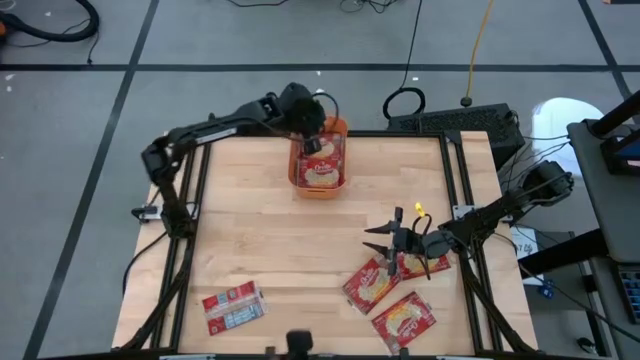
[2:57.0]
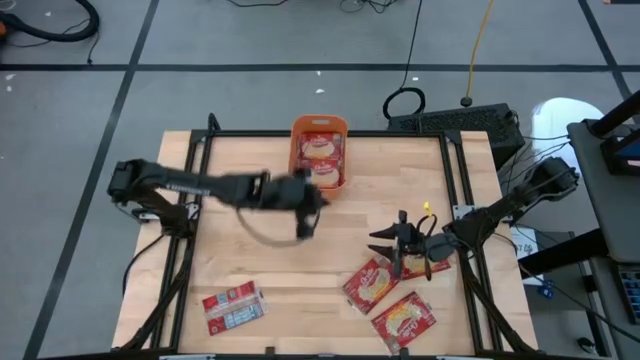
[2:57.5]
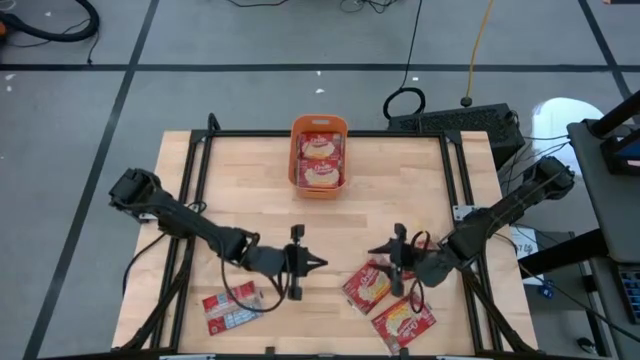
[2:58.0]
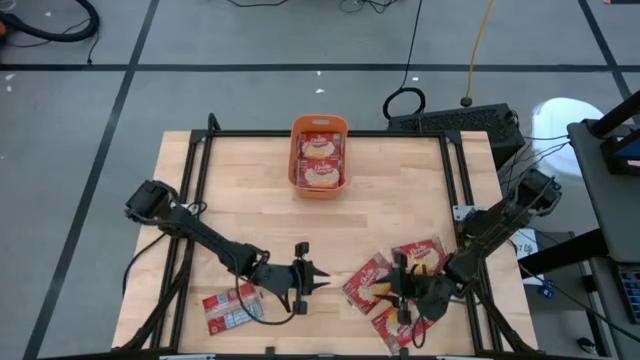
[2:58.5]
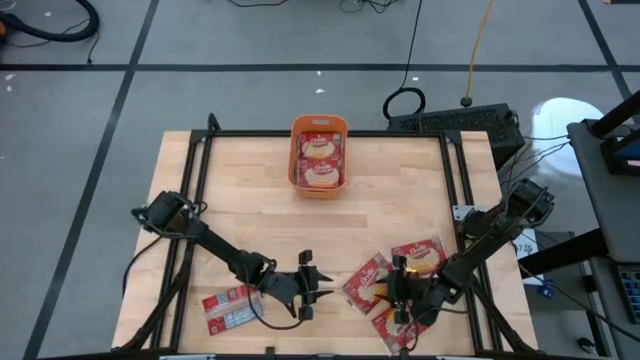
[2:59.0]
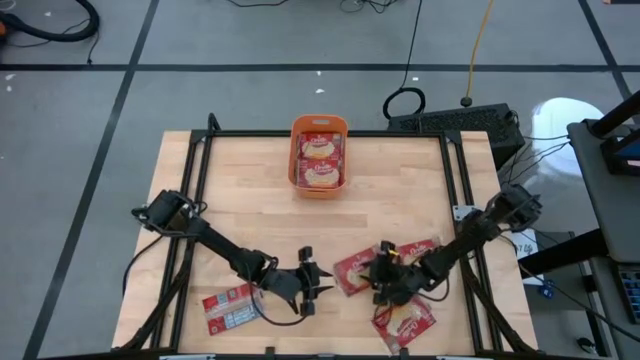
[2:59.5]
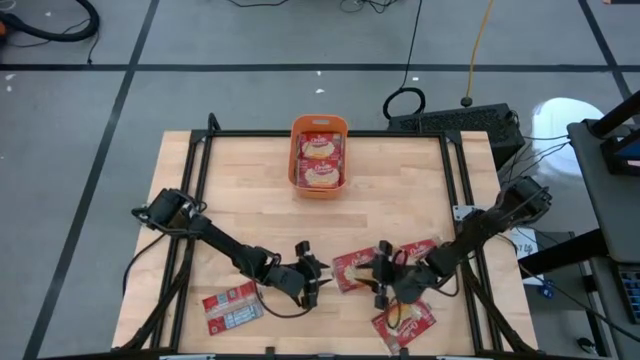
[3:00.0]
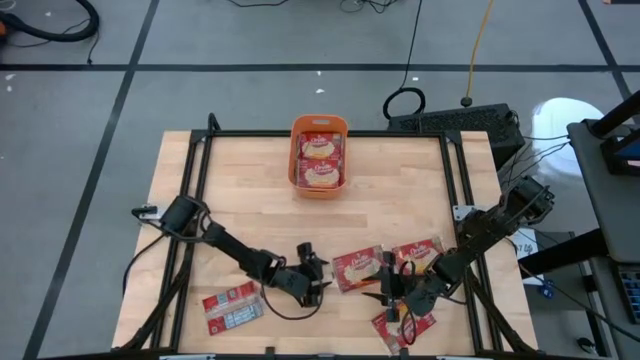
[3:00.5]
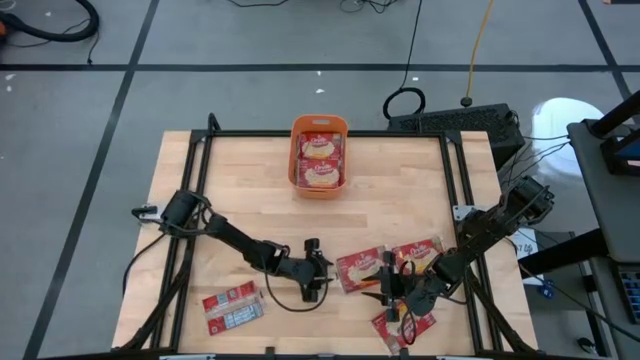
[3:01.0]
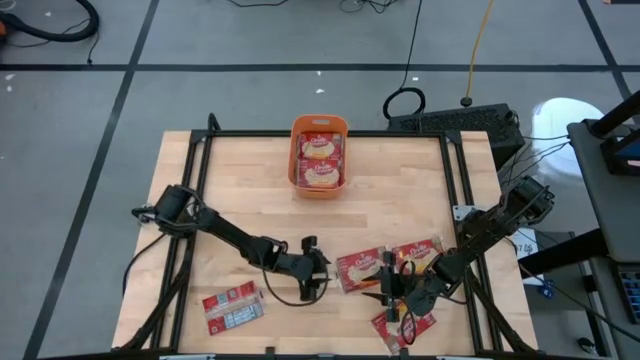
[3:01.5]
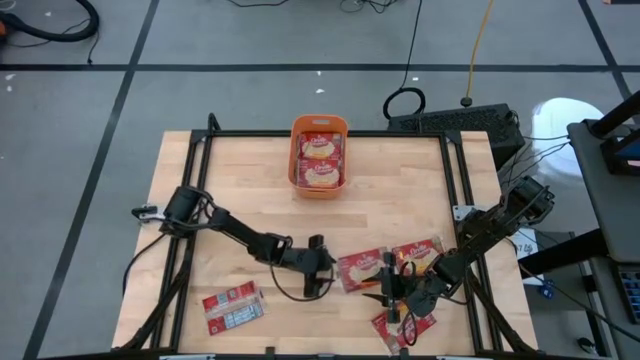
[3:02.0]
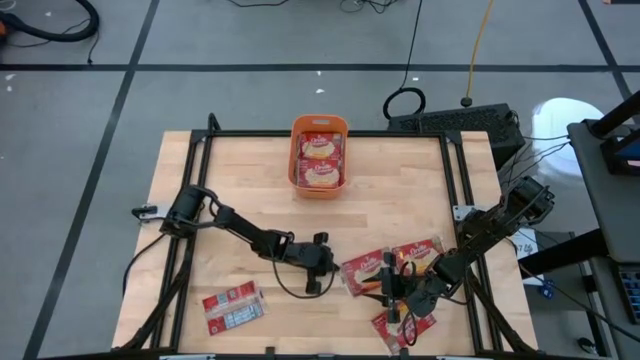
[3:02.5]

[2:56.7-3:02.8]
Task: Sort popcorn bags into baskets
Put the red popcorn bag into the orange bin

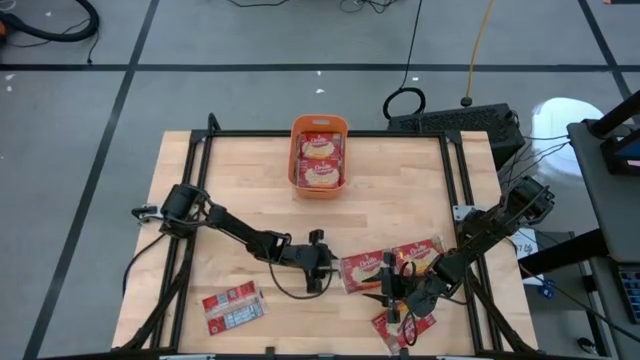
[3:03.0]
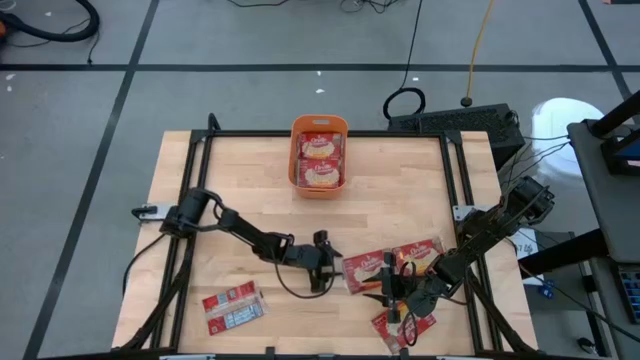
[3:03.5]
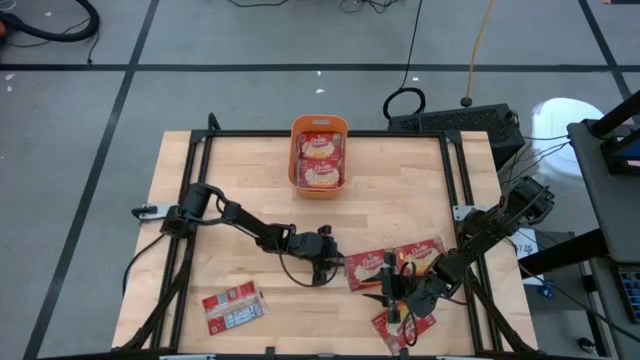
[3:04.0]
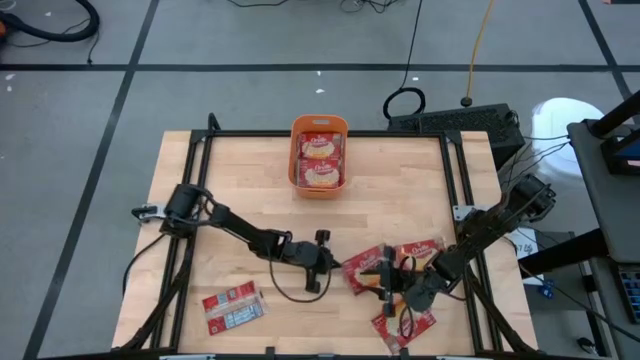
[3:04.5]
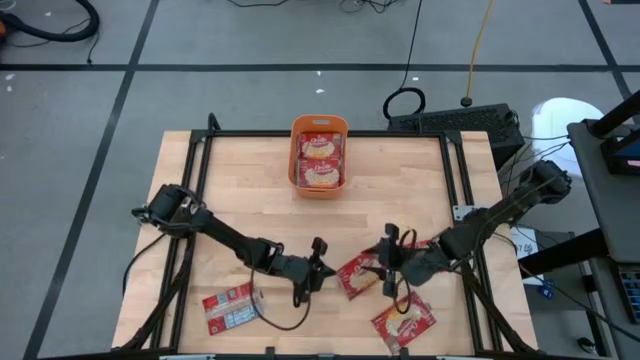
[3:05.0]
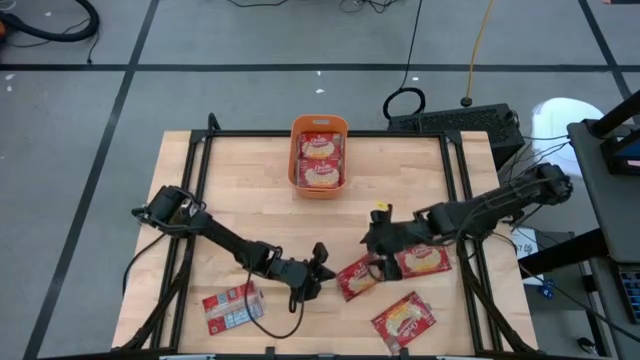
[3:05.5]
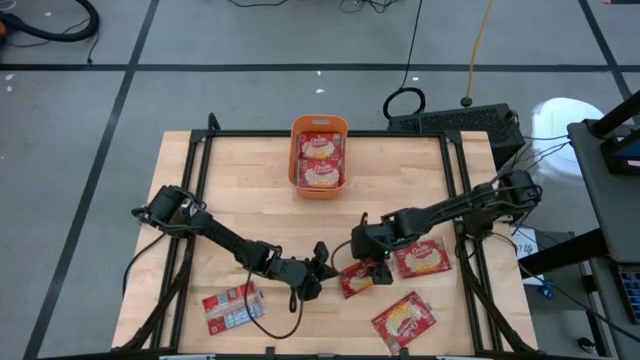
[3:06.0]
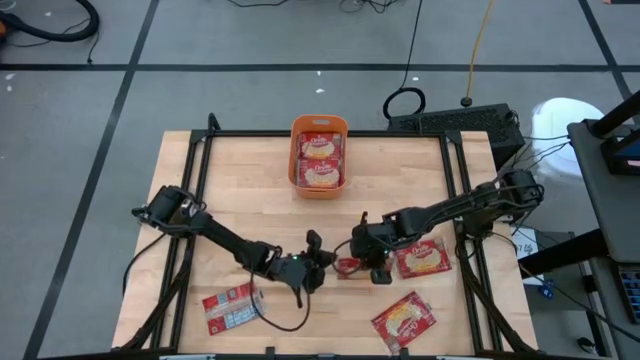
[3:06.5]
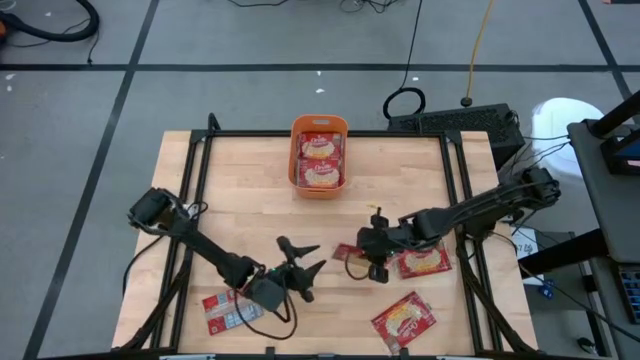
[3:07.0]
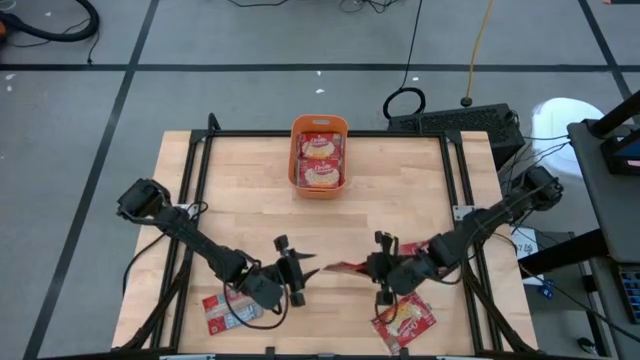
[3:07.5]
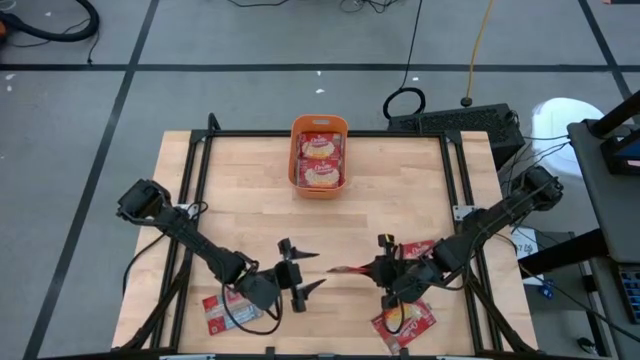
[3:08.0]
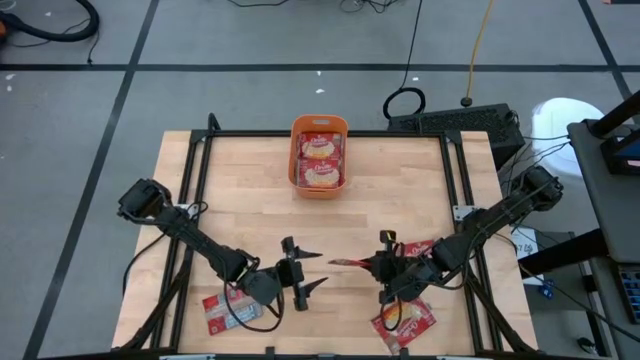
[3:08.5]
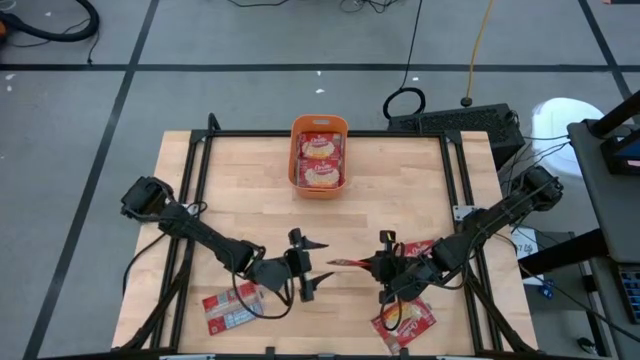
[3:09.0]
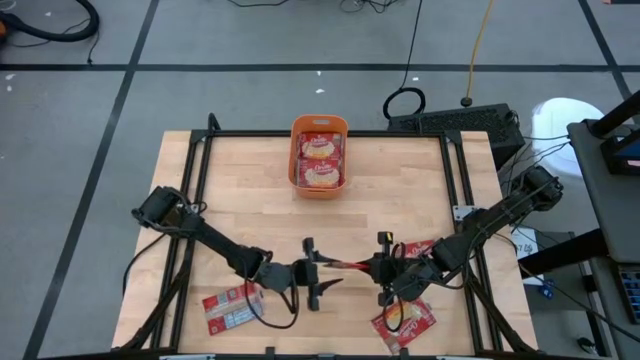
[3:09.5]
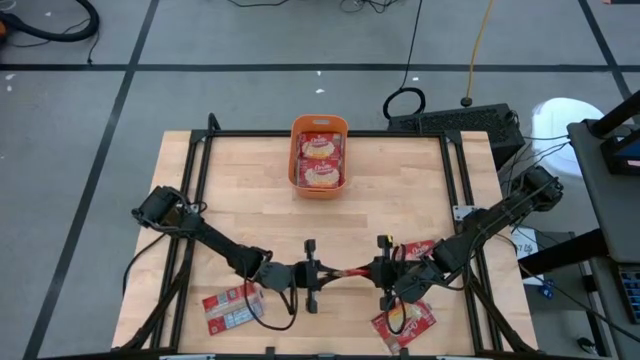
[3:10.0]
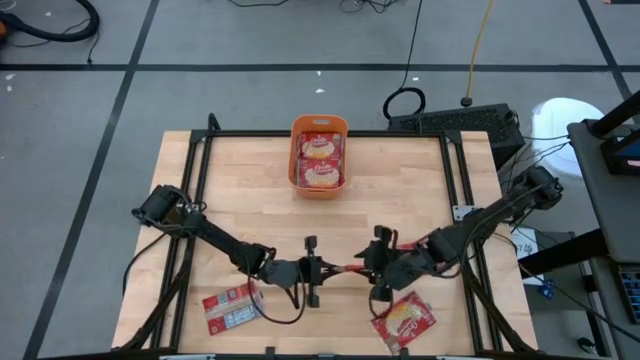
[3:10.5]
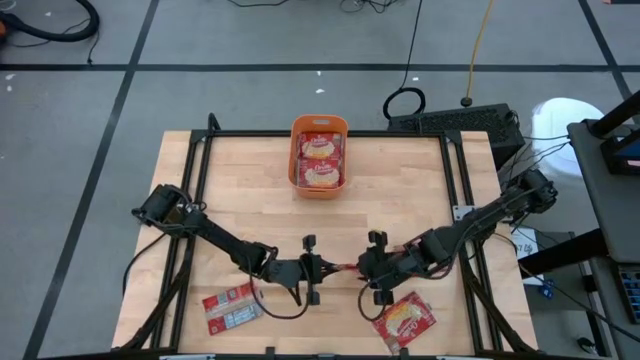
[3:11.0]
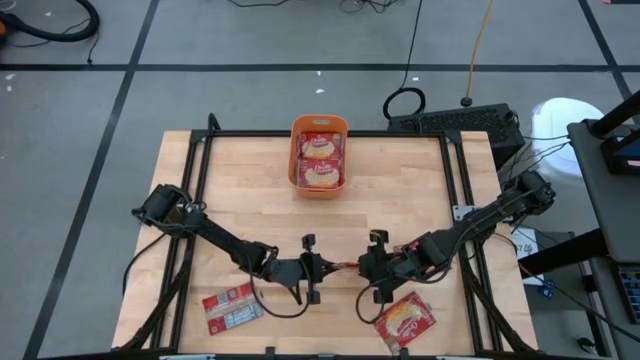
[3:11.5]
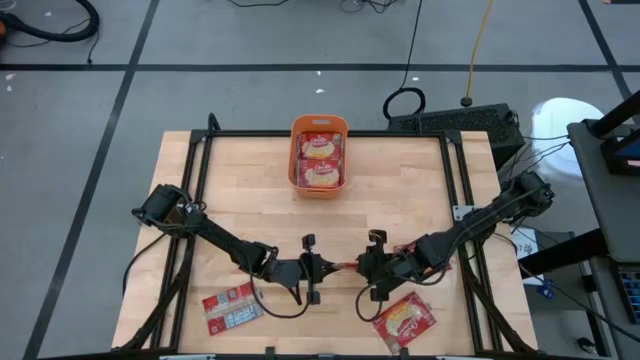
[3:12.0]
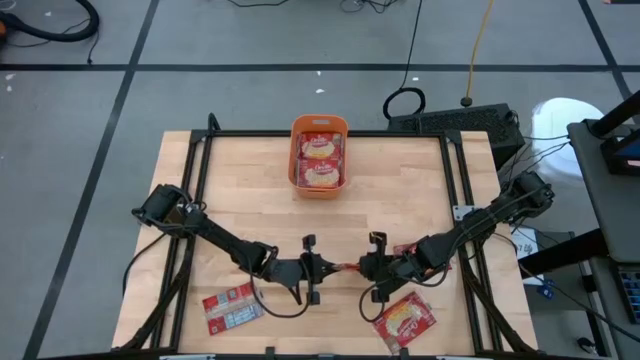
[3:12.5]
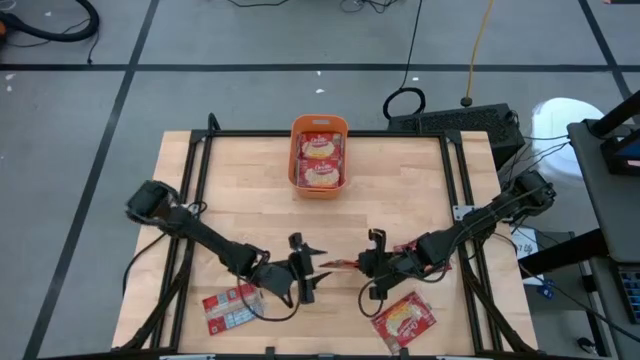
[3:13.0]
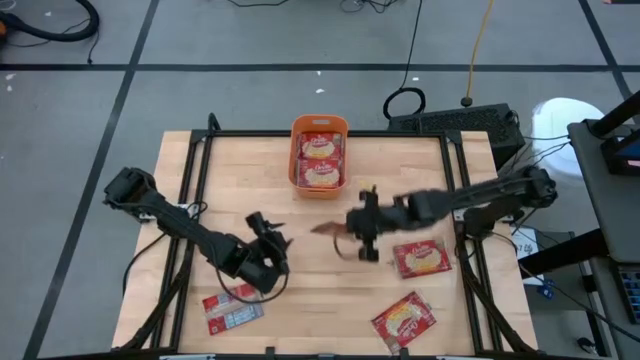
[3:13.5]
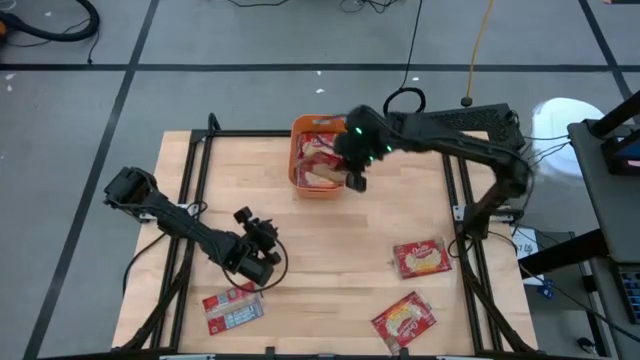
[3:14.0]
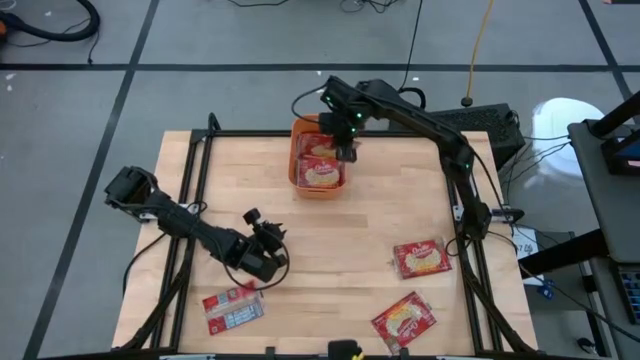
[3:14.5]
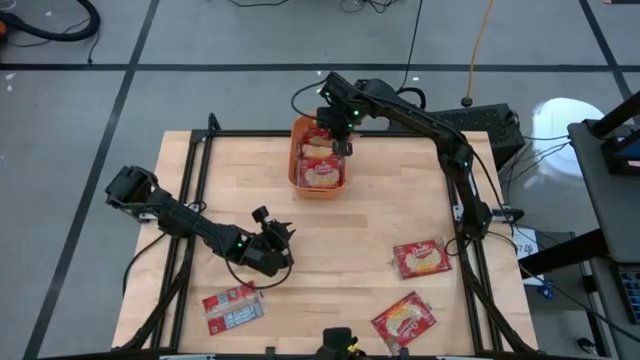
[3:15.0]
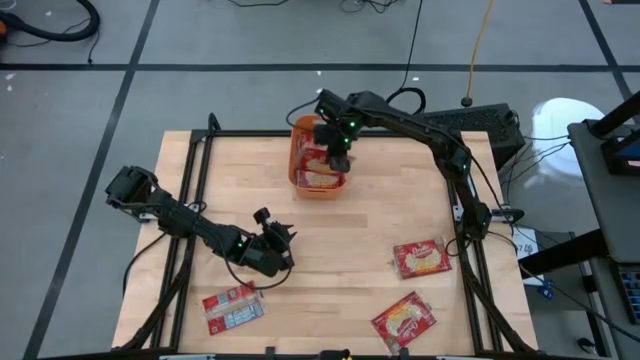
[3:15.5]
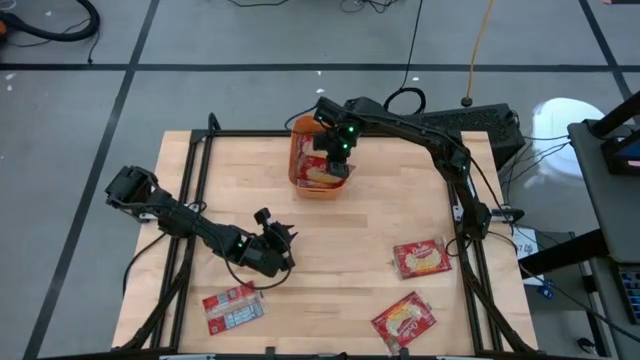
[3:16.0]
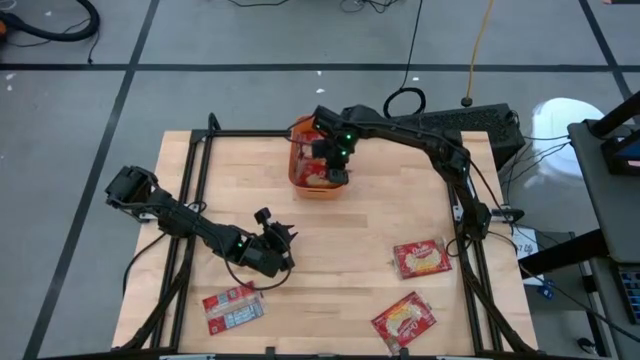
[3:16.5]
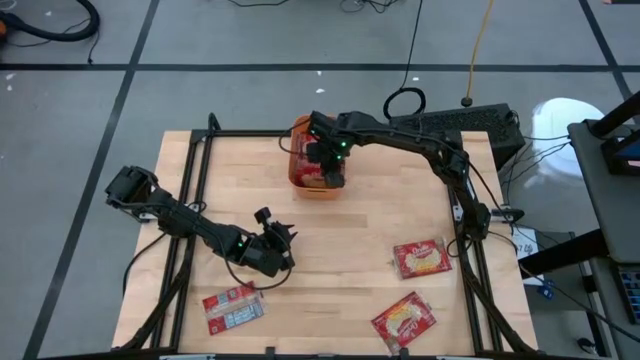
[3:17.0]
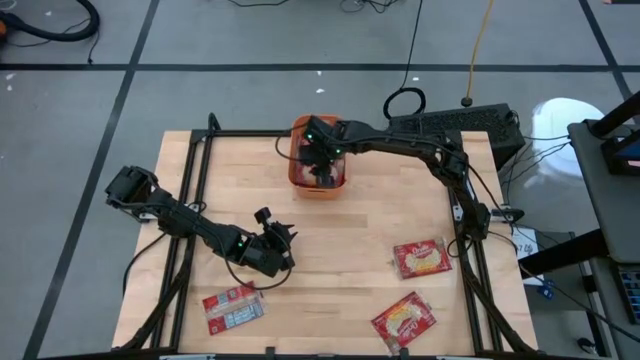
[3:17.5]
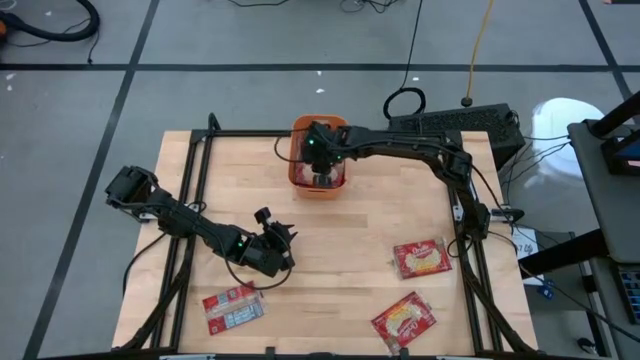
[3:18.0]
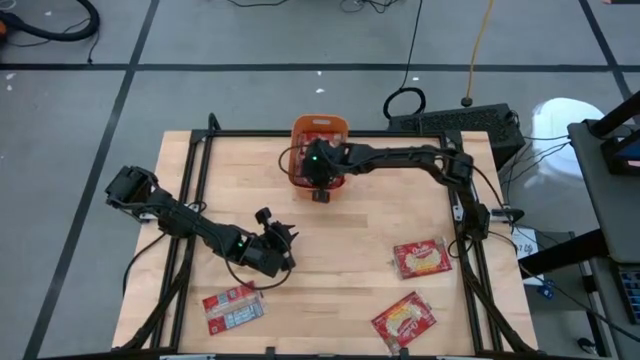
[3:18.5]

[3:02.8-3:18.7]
Put the red popcorn bag into the orange bin

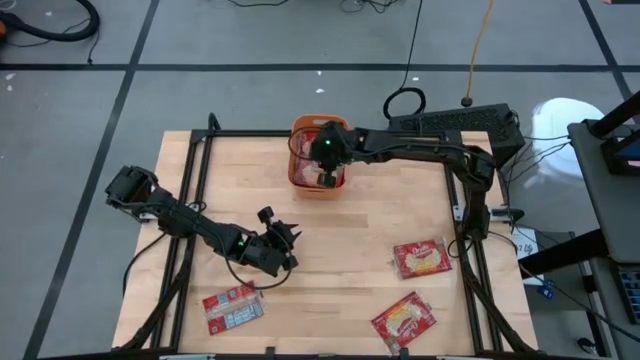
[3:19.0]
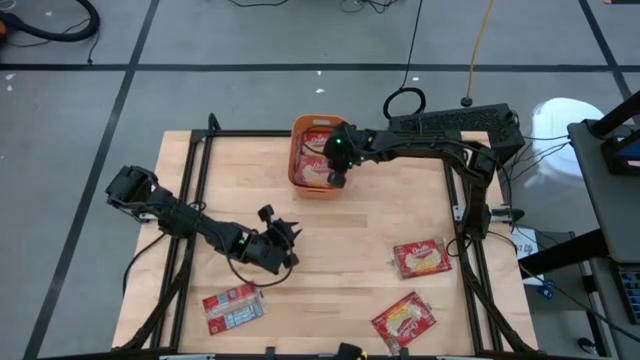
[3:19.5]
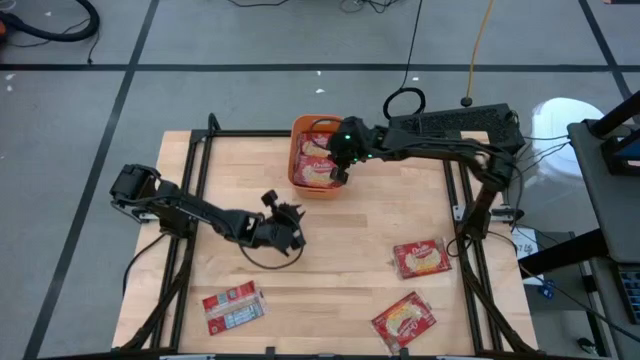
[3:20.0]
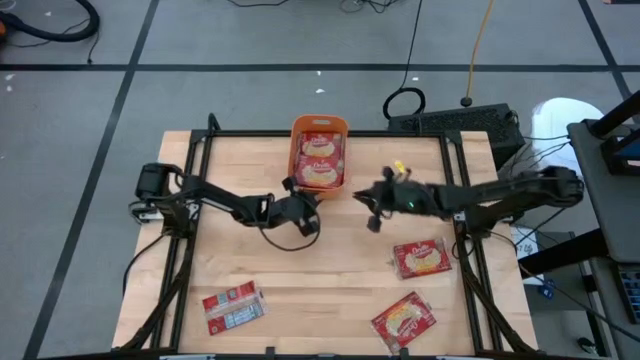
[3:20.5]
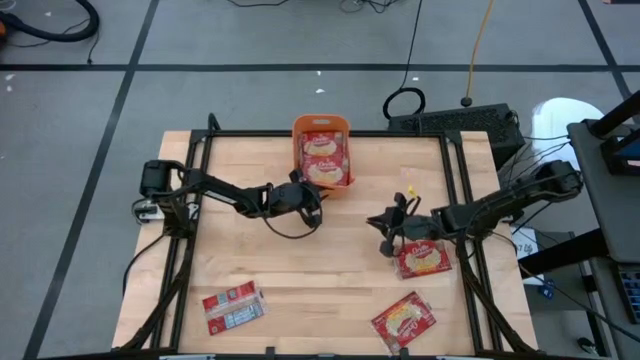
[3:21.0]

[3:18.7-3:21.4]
Adjust orange bin on the table
